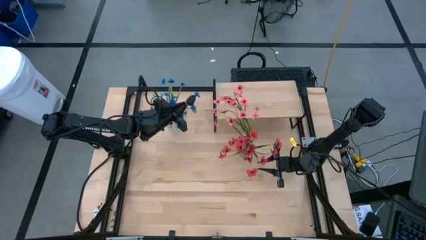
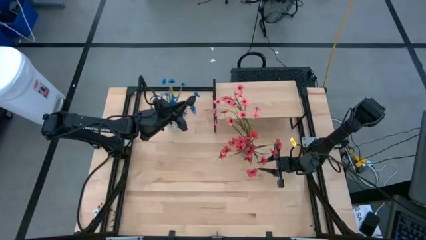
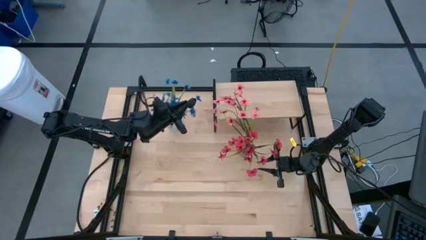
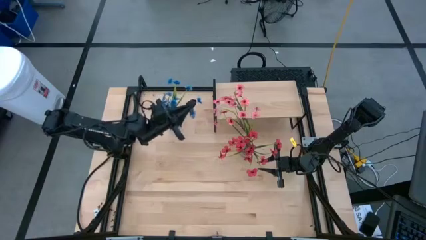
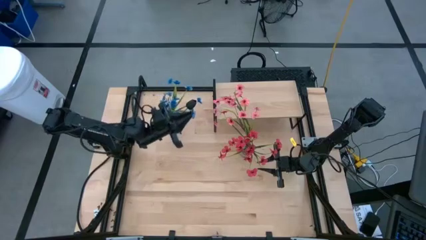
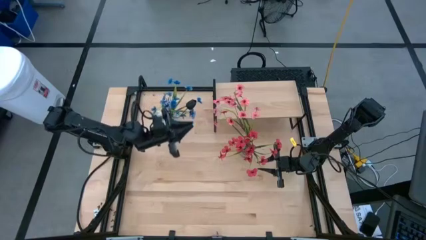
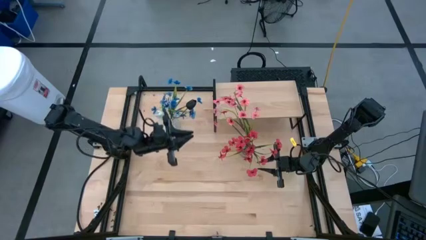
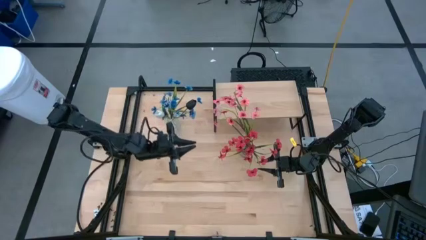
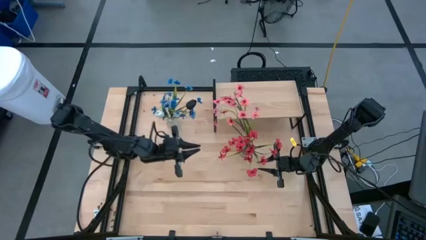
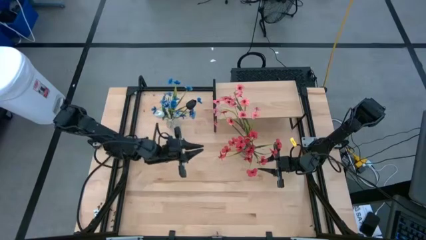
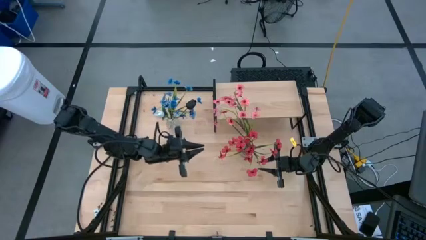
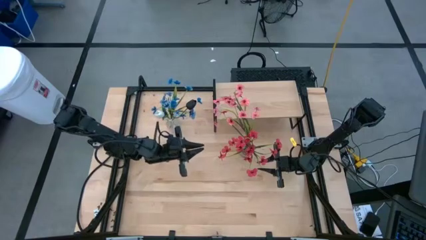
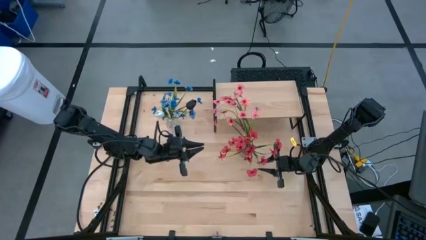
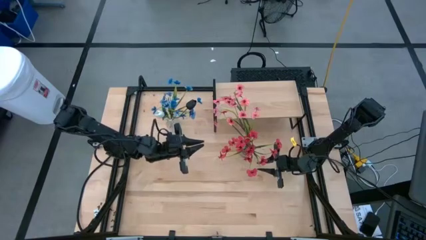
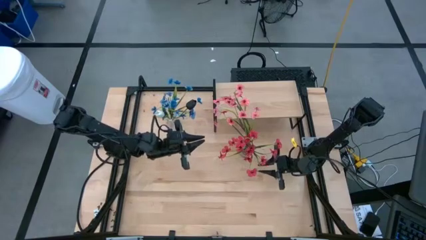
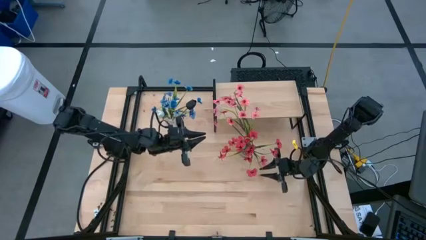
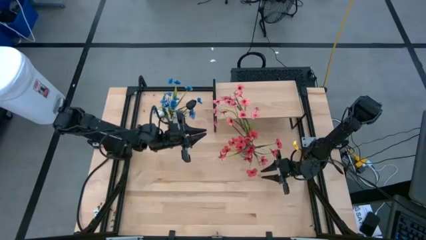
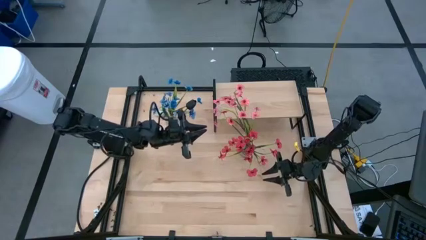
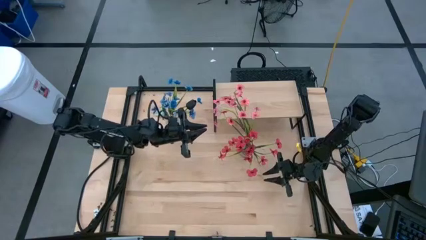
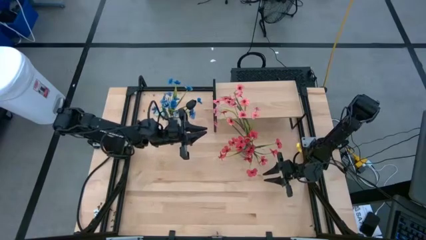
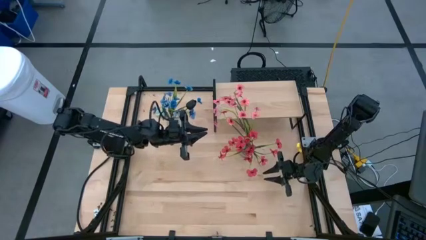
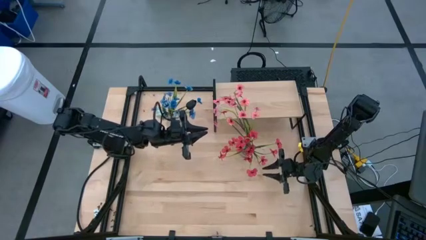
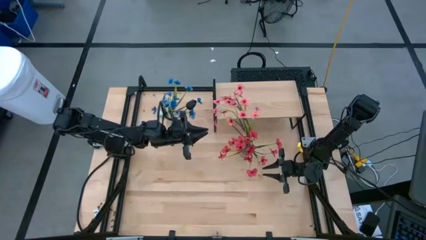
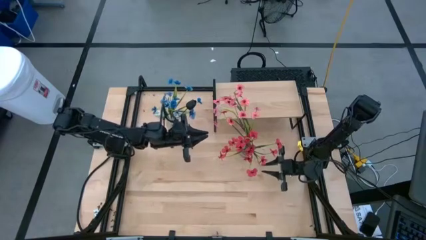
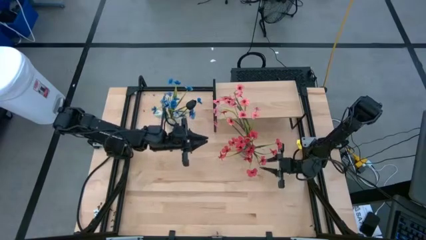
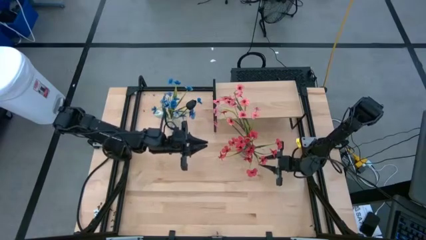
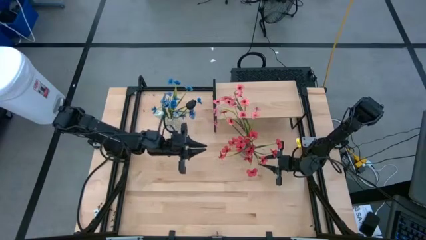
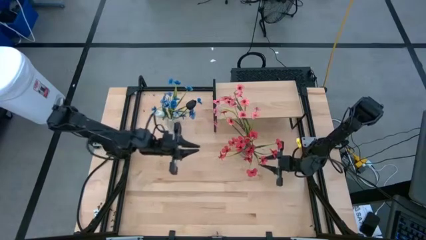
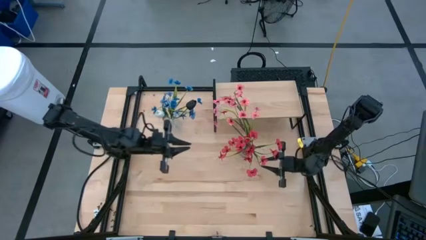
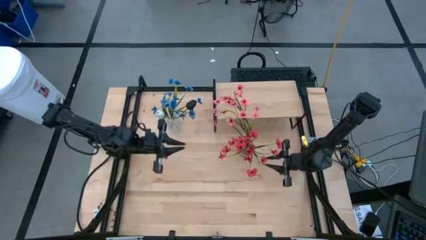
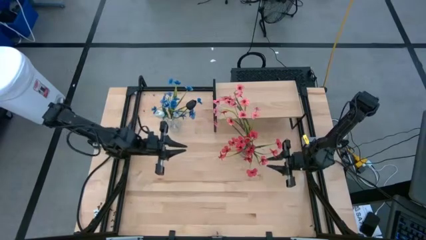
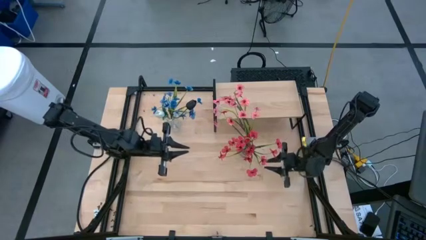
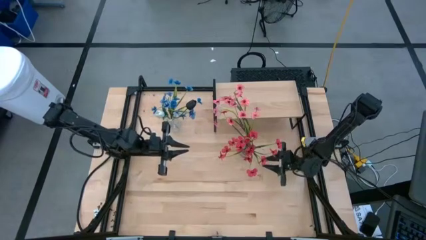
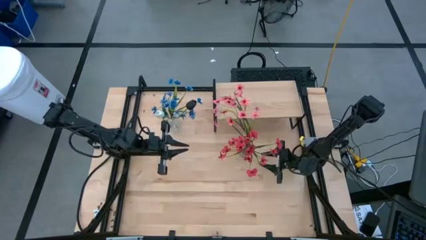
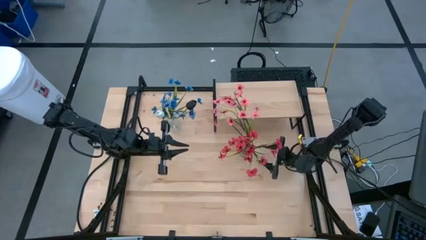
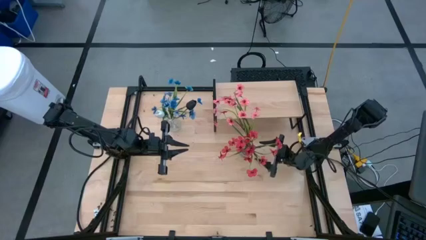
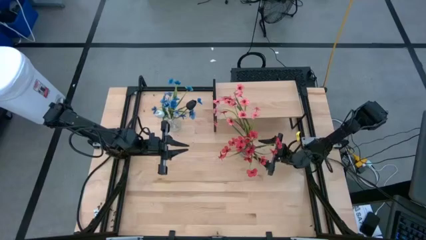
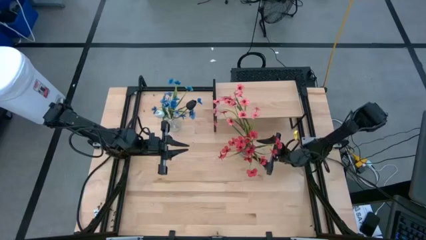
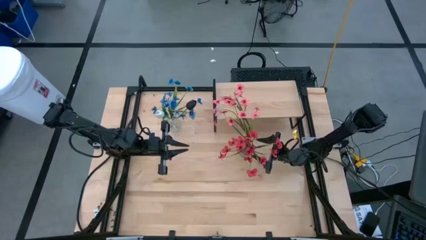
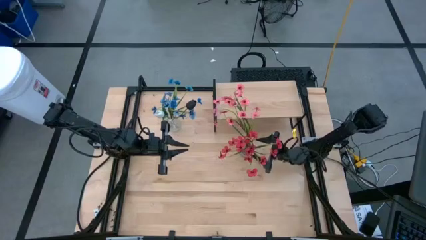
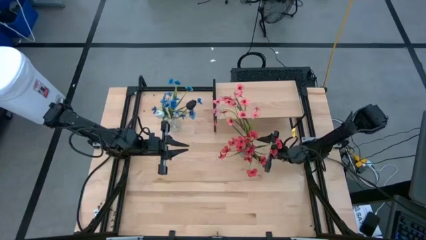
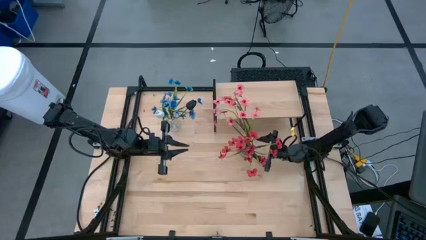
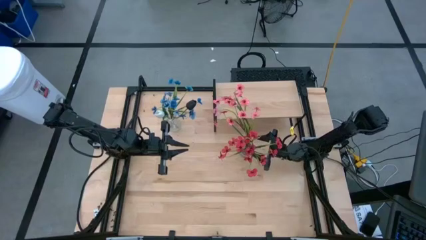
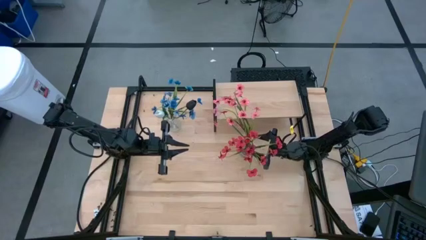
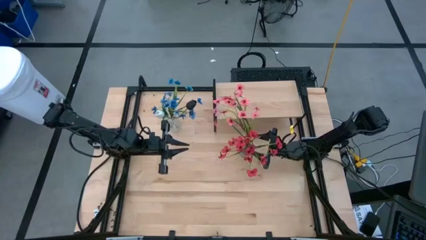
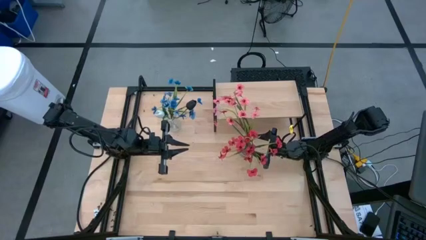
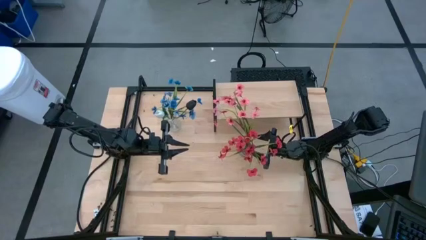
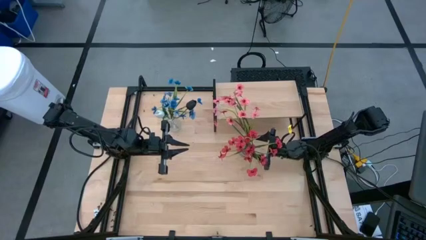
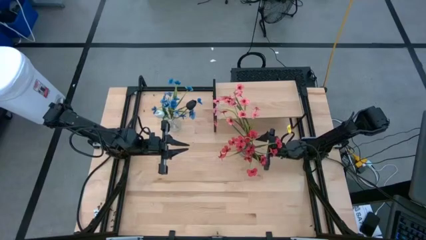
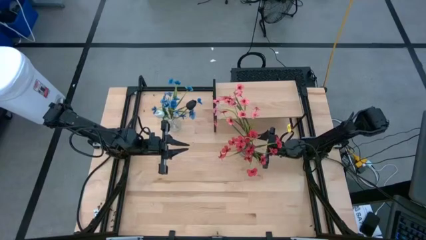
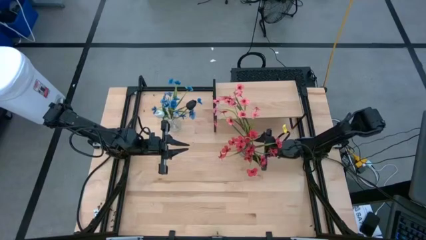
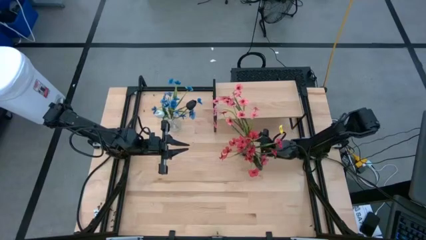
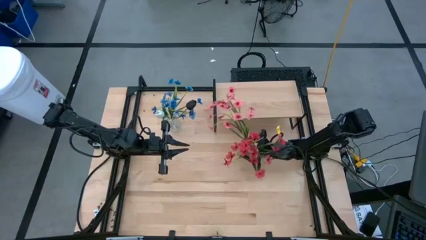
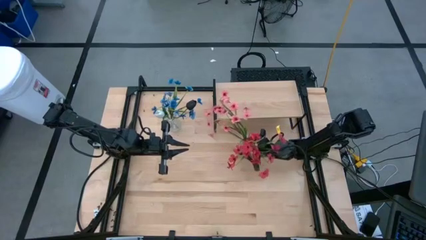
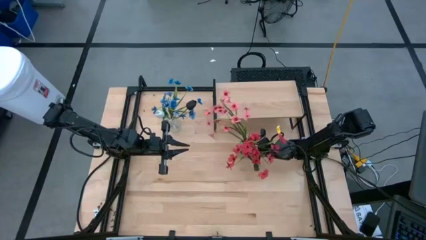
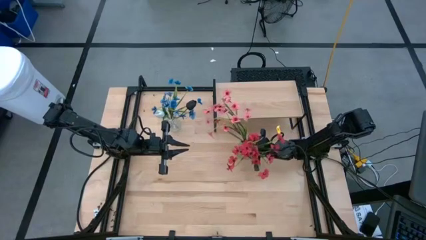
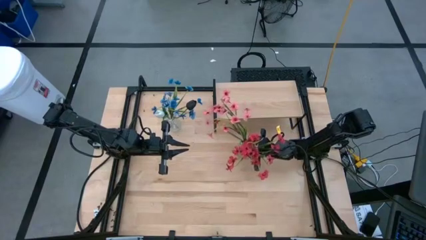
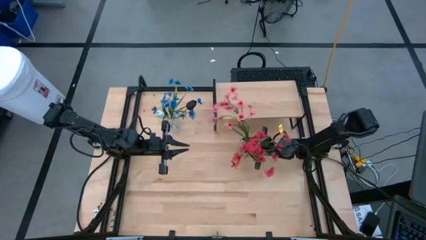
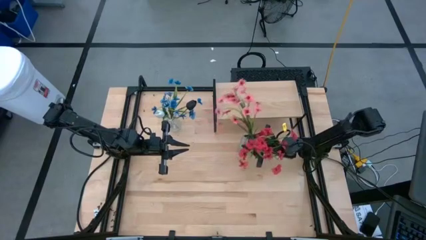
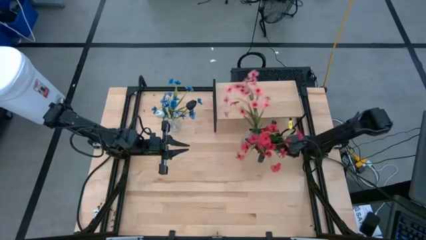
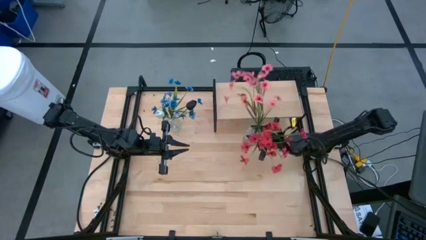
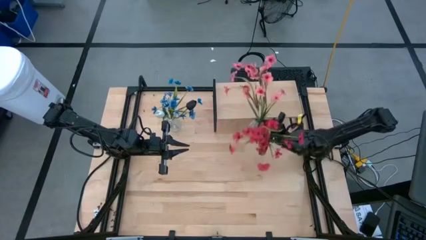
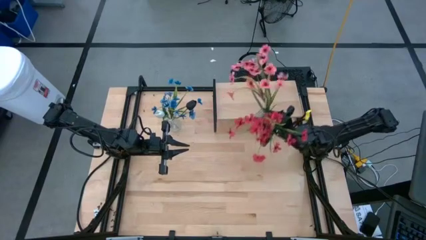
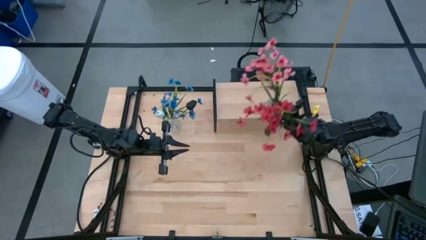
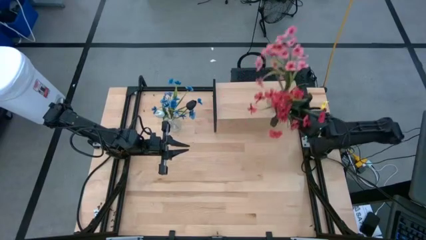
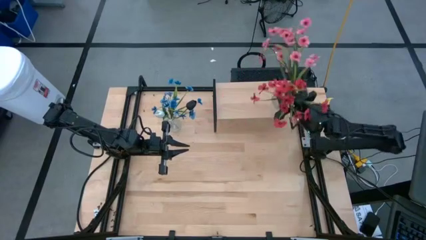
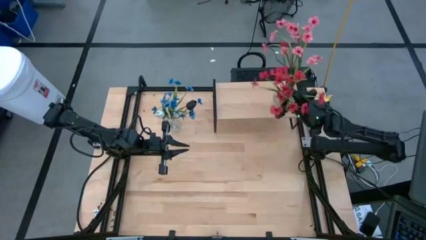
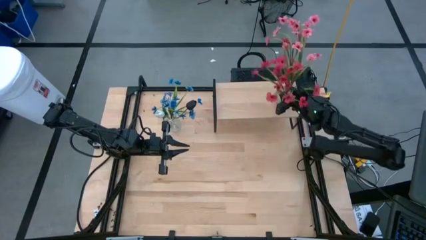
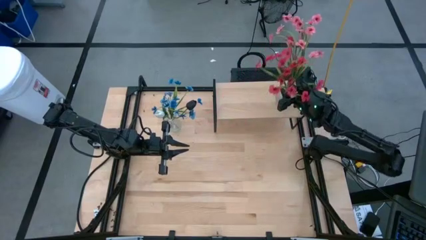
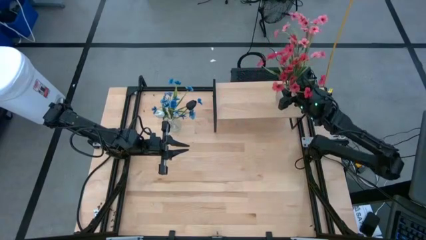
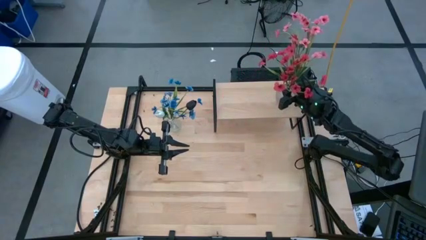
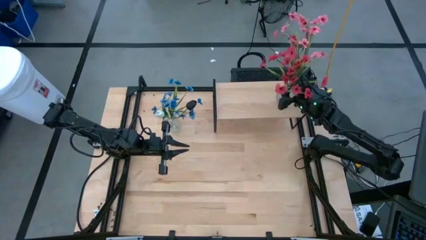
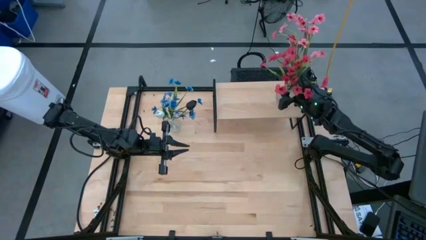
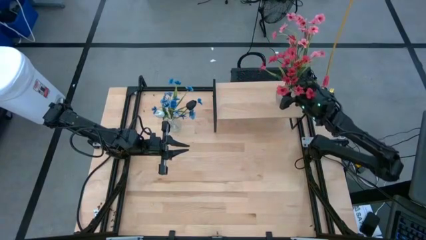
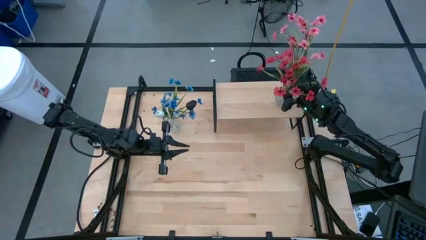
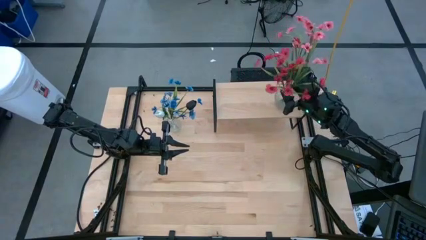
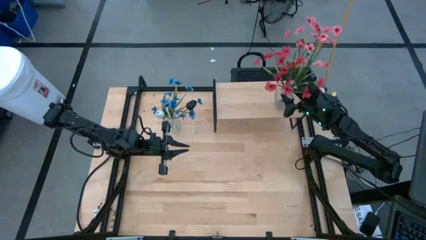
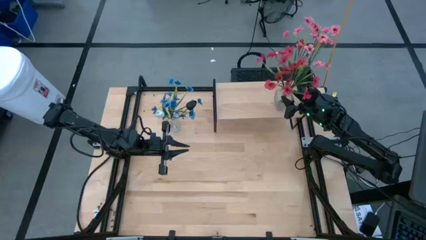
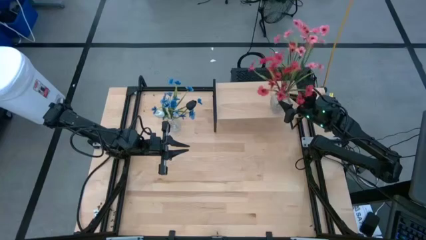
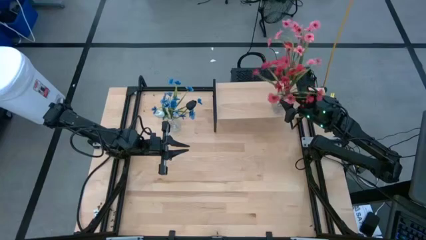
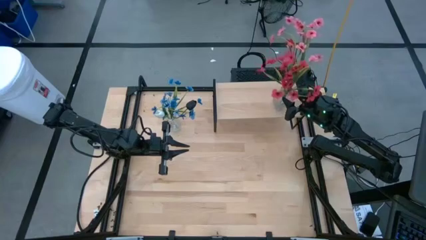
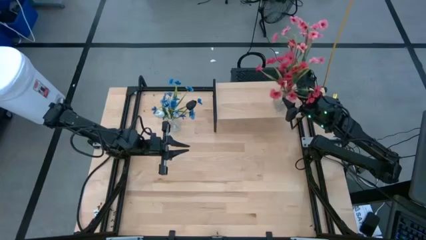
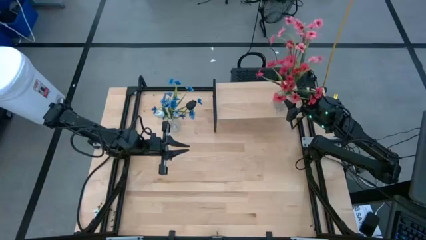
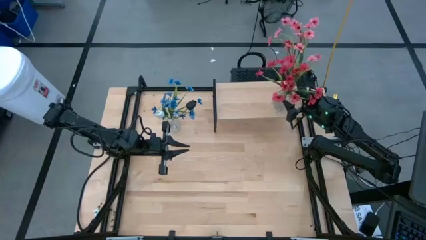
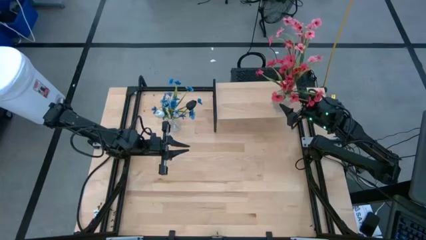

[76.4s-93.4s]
Task: Pick and place flowers into a vace then onto a shelf
Put the right transparent vase with flowers on the shelf
